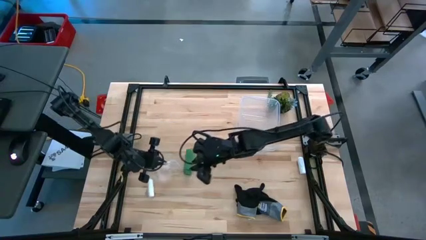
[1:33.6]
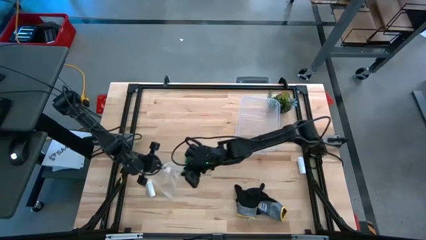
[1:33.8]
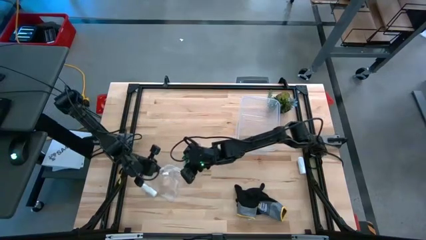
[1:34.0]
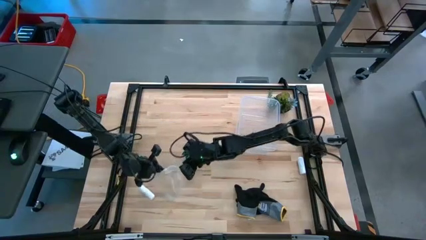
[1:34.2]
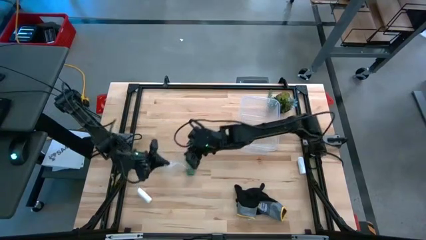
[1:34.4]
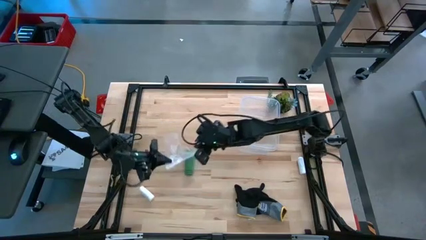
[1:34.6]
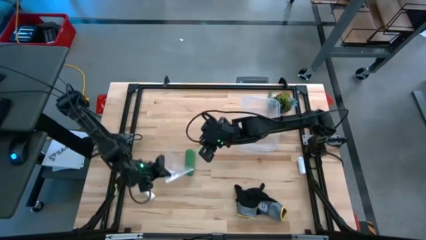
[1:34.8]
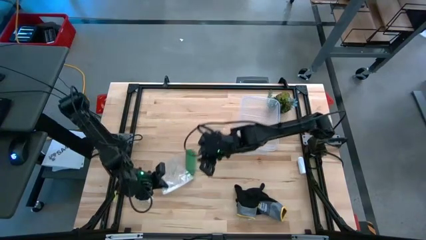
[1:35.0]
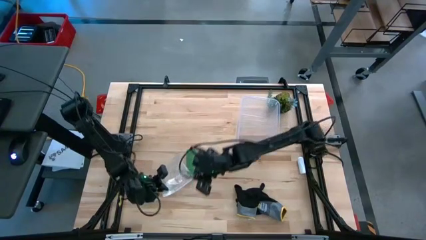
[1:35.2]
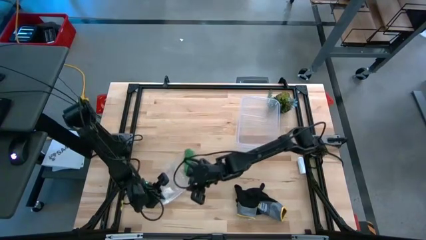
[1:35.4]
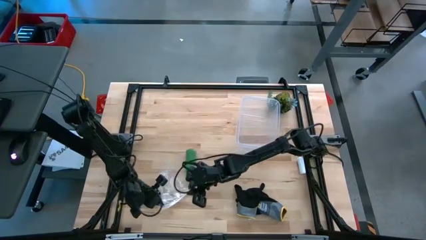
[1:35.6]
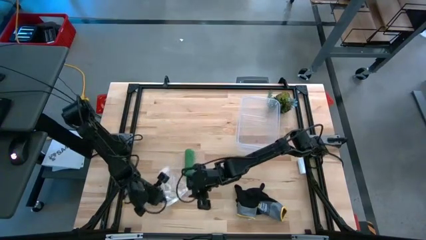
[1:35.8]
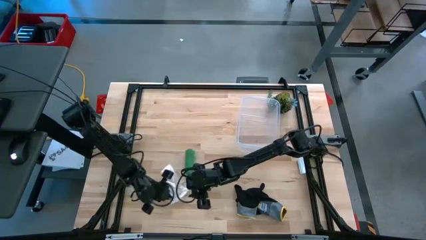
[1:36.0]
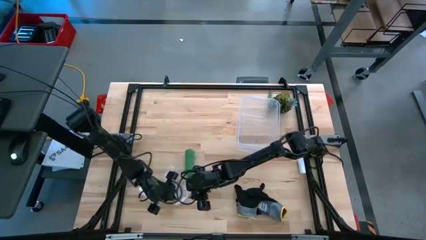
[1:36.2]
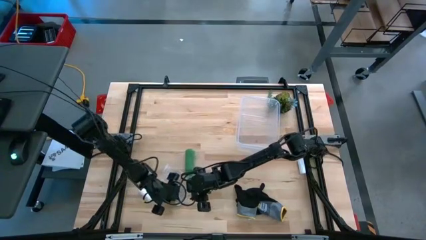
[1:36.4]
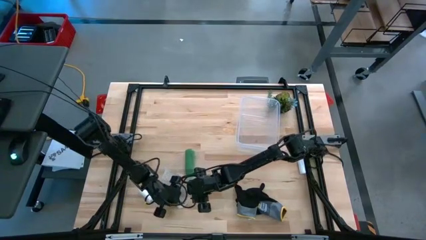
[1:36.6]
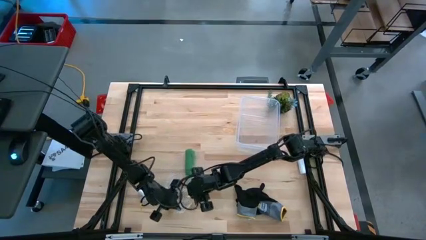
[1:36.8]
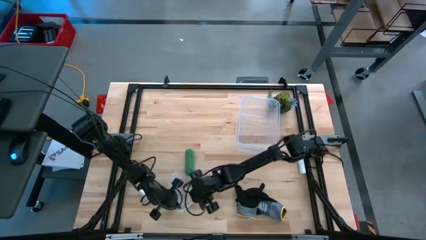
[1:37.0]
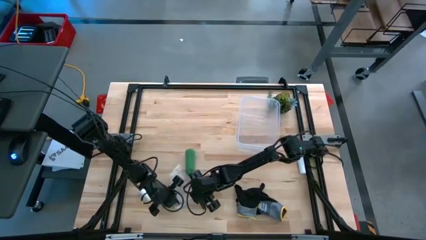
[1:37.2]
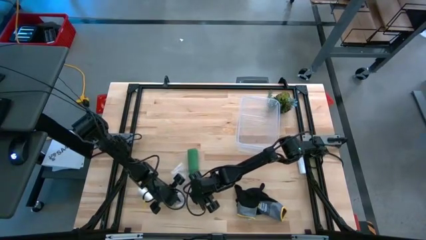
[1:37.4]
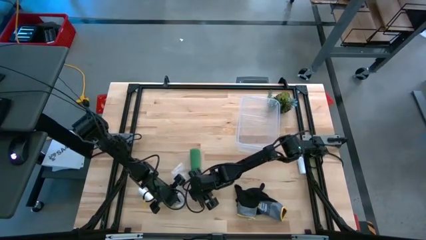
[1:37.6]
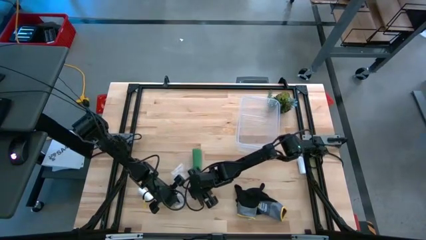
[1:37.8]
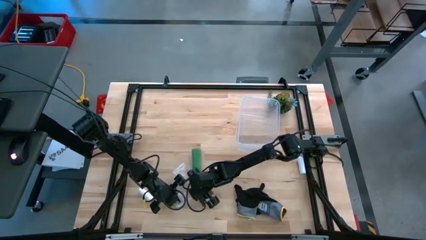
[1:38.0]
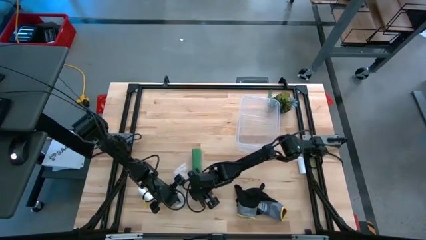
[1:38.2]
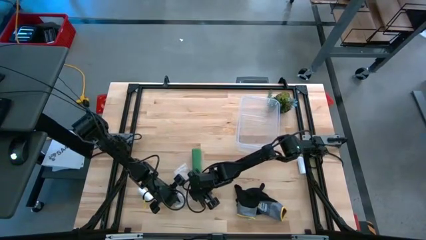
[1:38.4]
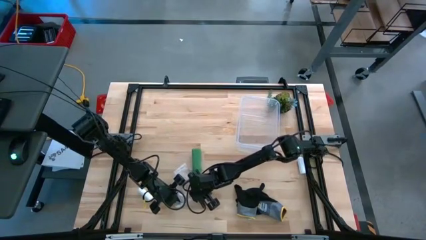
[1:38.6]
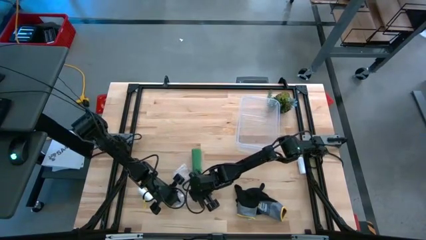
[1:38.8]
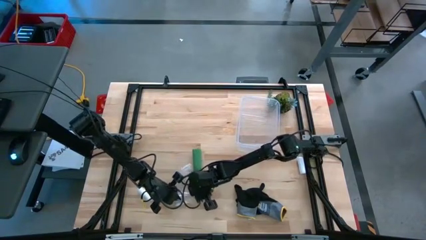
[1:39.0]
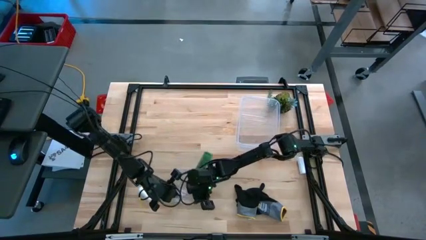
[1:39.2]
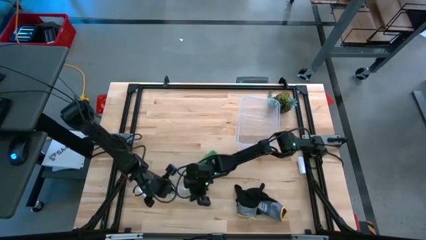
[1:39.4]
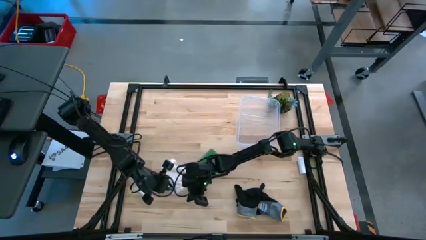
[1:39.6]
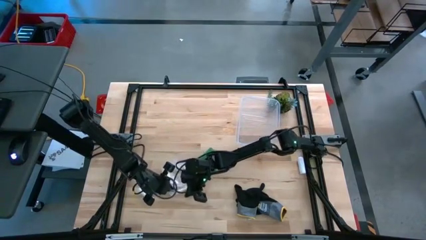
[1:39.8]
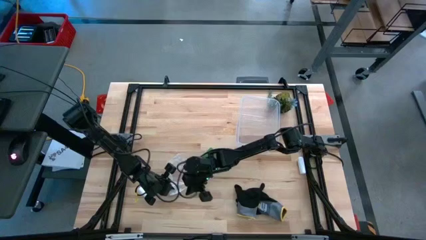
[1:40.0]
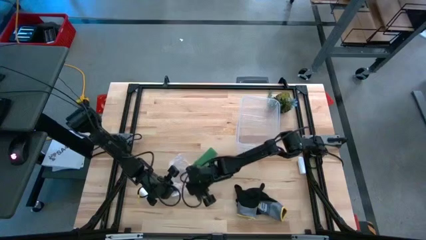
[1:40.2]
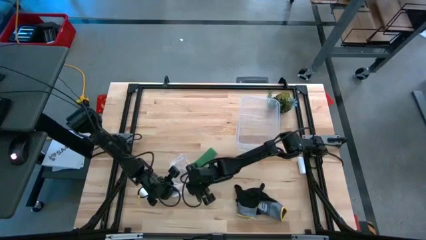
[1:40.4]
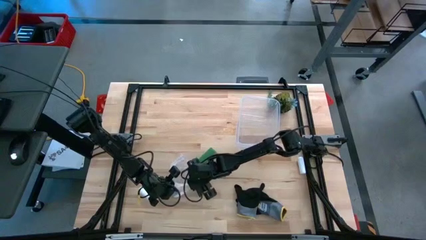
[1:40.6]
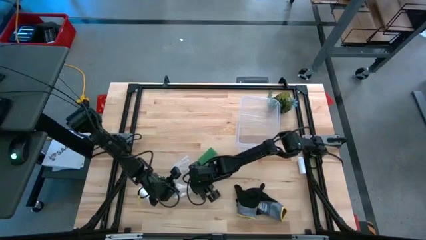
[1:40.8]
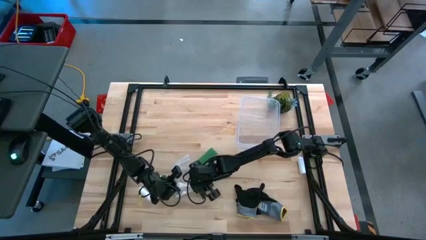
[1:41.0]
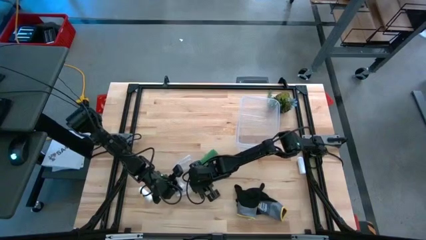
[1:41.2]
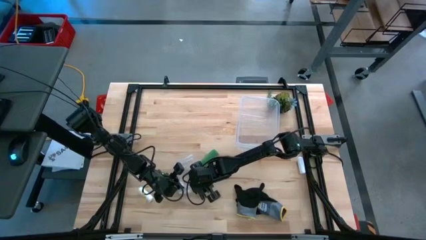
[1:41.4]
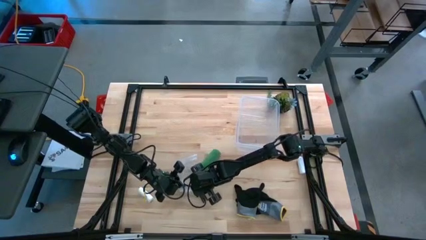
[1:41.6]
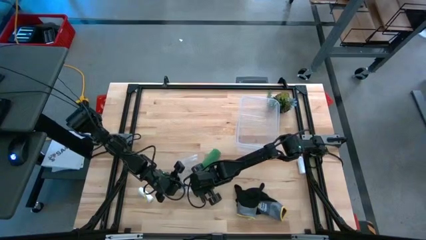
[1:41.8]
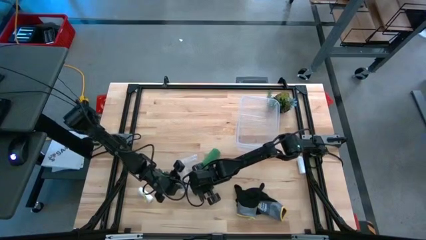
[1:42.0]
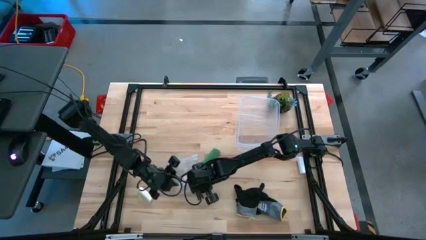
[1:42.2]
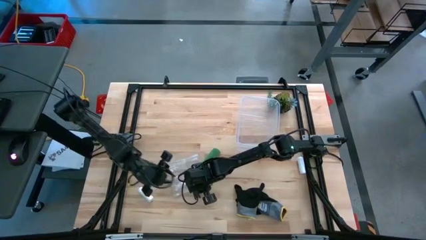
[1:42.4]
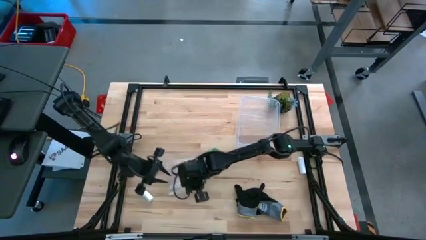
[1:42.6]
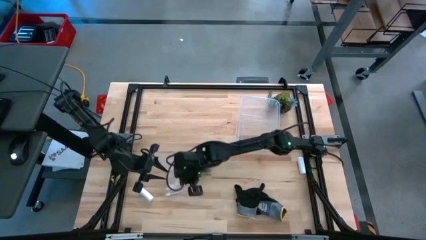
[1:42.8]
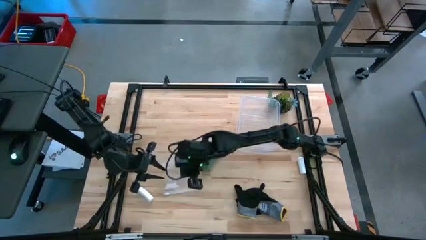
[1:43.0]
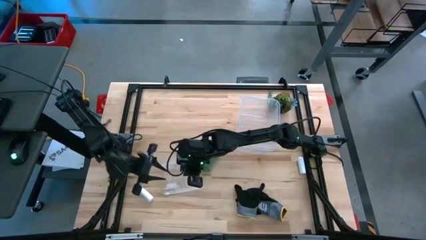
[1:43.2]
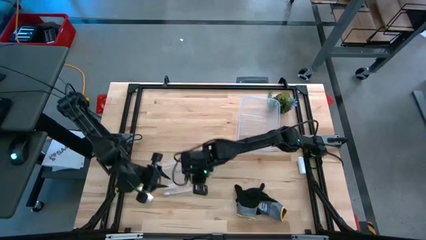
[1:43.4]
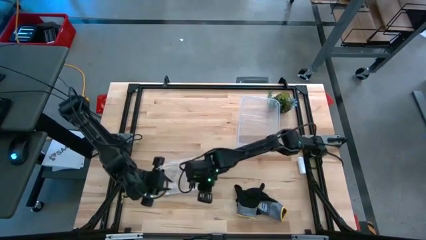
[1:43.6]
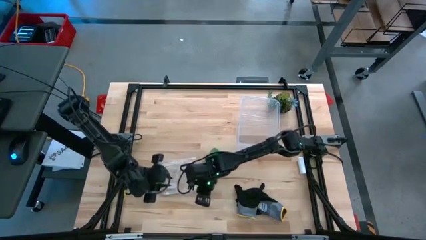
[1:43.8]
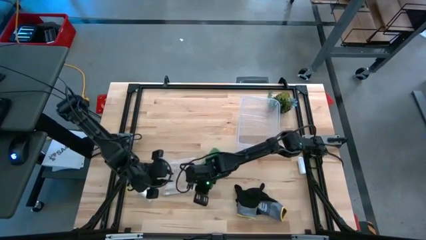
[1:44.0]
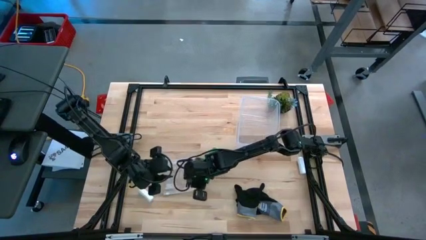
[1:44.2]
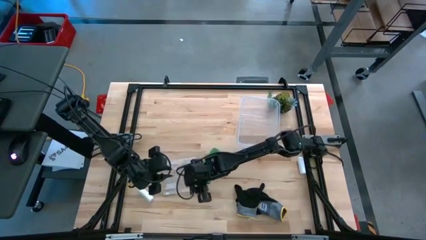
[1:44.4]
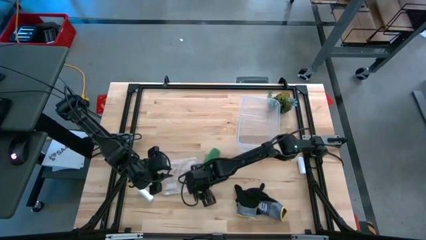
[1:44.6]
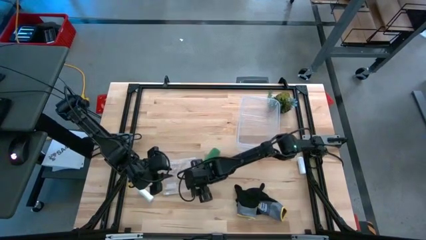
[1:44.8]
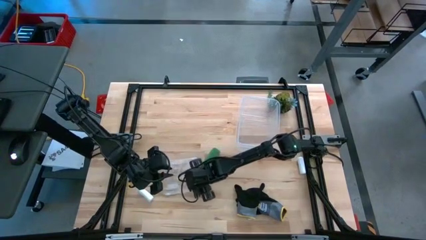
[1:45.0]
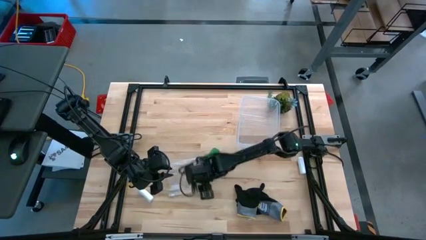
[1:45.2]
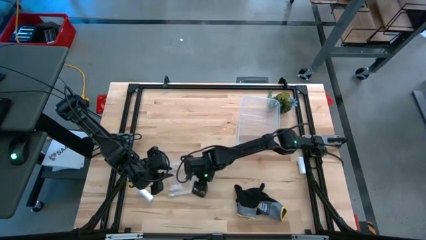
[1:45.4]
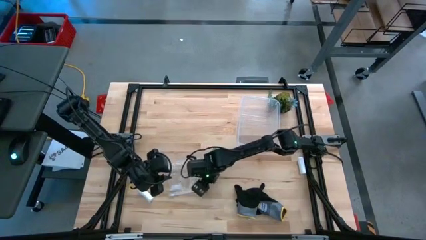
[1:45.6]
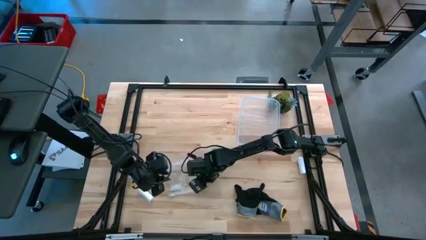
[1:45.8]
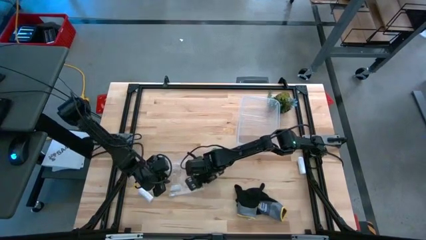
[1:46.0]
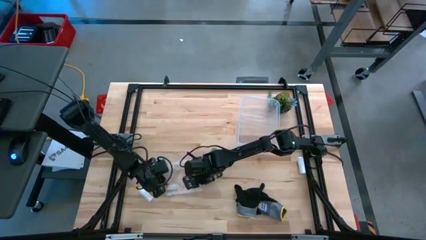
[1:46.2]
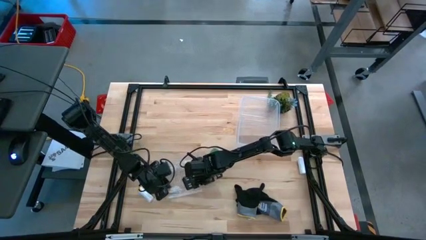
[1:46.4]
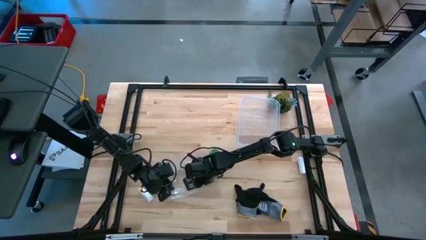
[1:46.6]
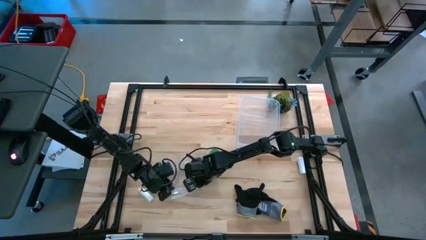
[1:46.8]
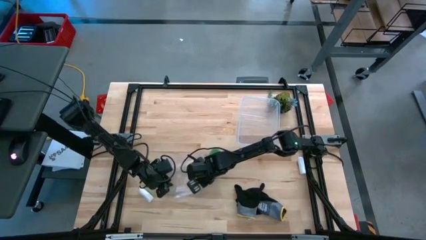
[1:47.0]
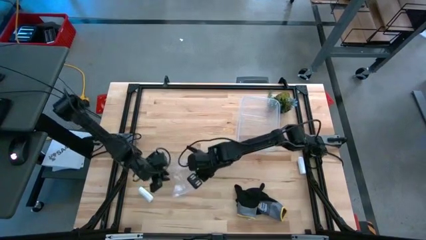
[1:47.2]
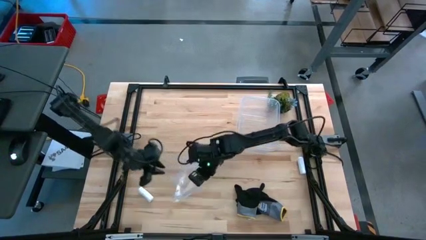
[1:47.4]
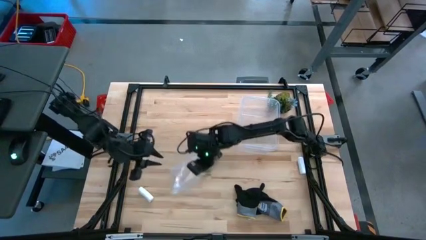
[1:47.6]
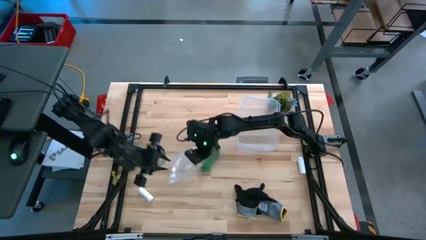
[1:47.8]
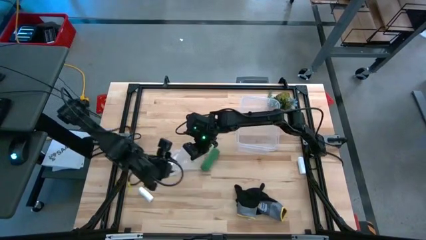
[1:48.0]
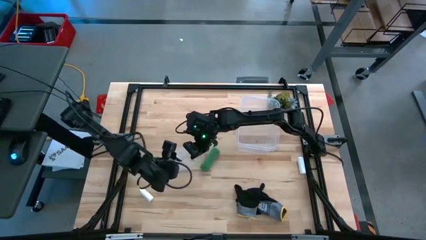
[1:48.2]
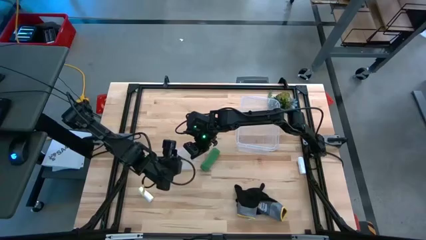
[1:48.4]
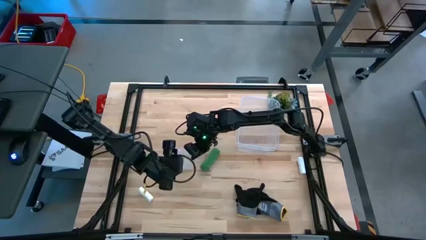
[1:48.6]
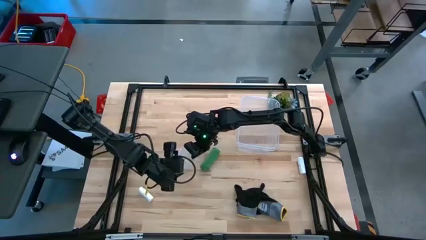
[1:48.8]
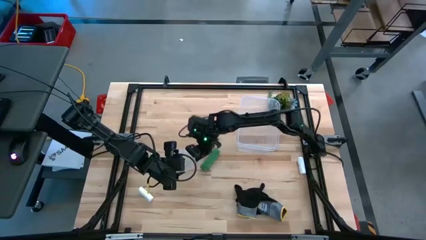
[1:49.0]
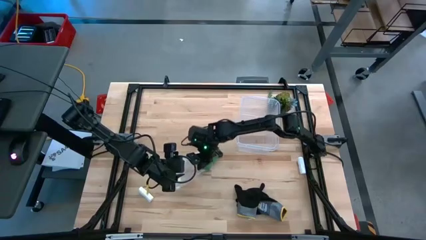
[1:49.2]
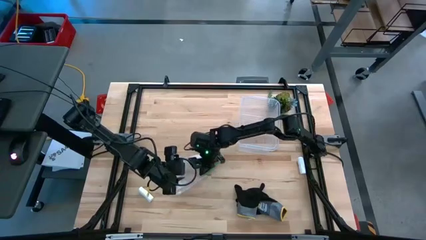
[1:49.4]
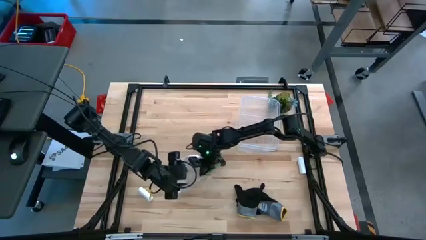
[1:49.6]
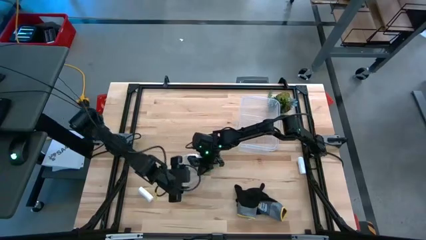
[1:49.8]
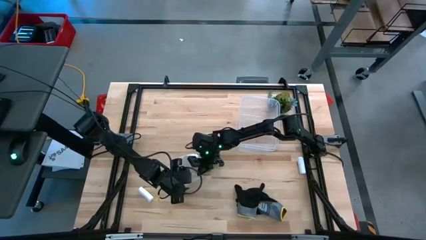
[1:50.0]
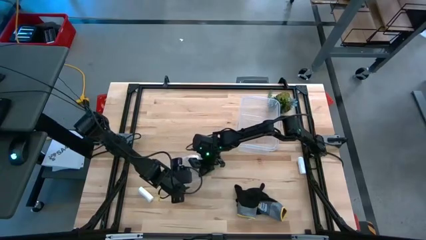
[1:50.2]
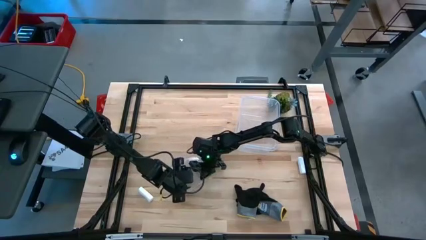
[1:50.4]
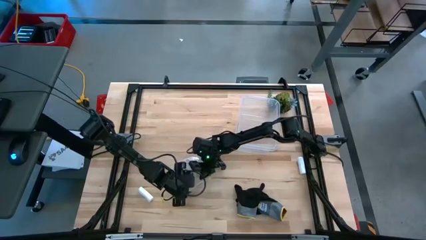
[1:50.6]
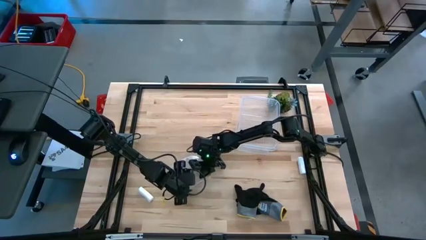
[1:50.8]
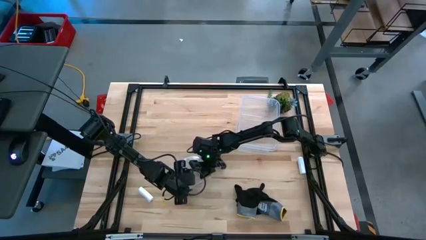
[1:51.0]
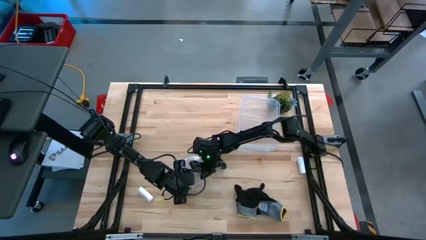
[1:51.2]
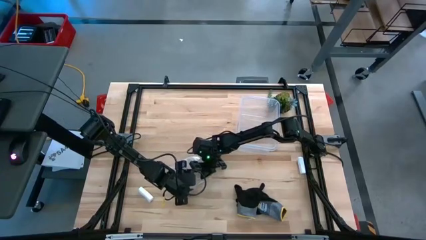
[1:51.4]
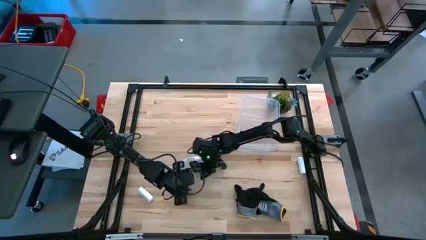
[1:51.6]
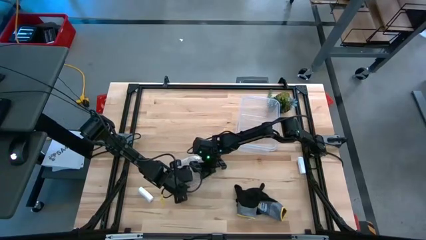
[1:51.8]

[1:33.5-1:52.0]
Task: Roll bandage
Open the transparent zip bag
